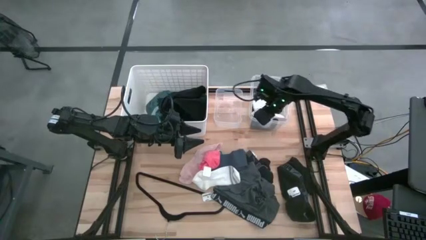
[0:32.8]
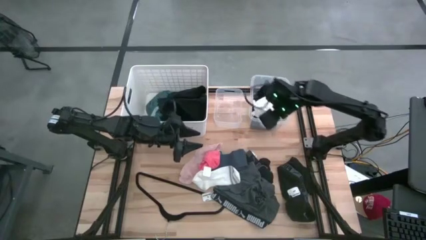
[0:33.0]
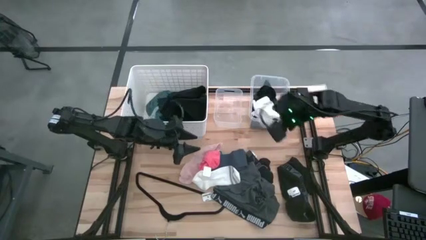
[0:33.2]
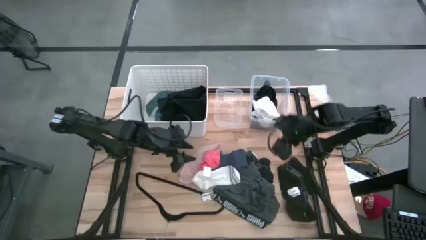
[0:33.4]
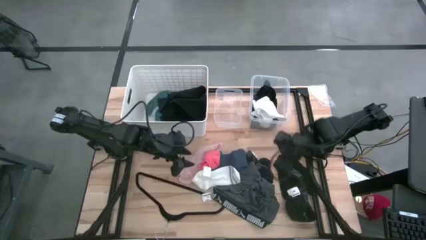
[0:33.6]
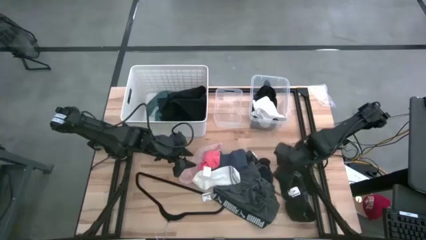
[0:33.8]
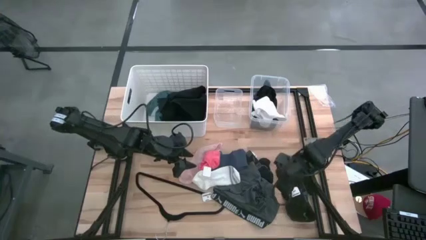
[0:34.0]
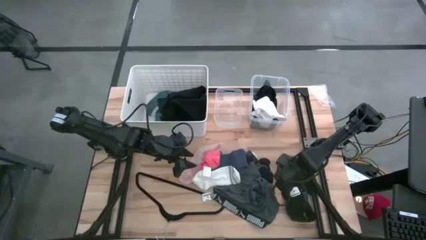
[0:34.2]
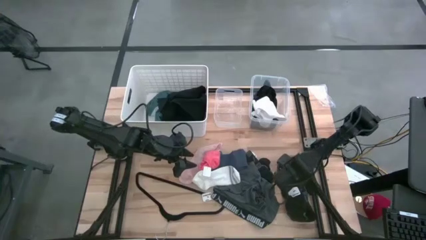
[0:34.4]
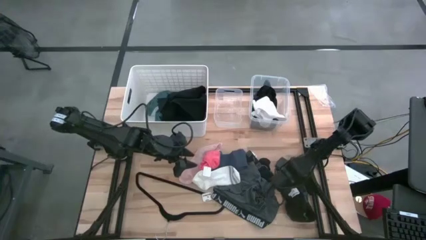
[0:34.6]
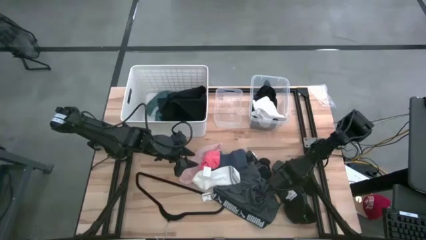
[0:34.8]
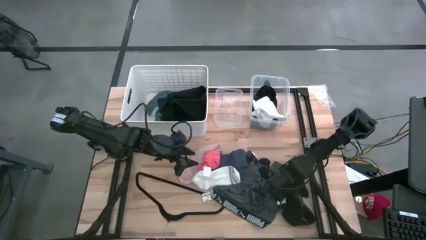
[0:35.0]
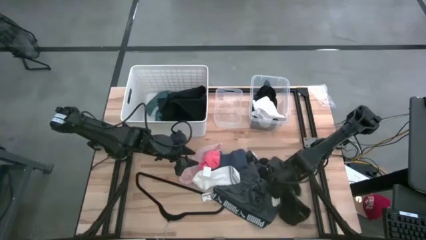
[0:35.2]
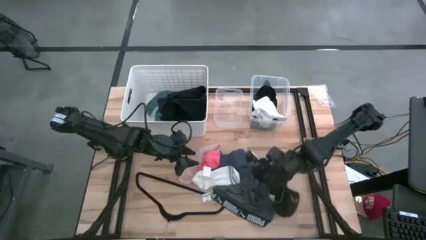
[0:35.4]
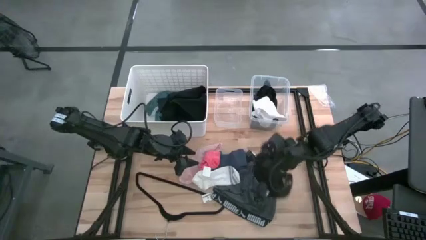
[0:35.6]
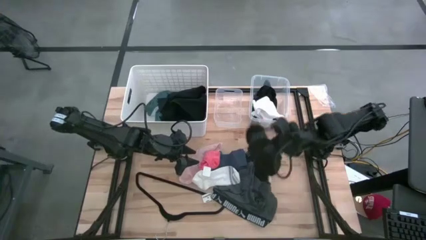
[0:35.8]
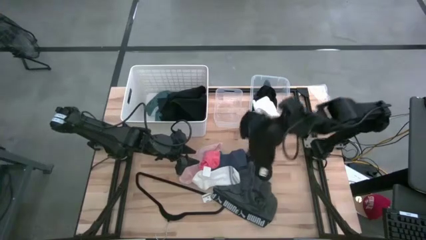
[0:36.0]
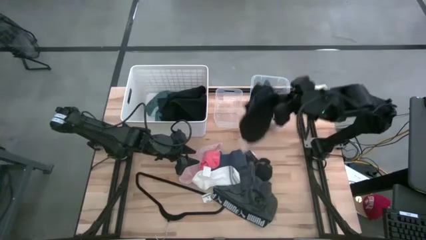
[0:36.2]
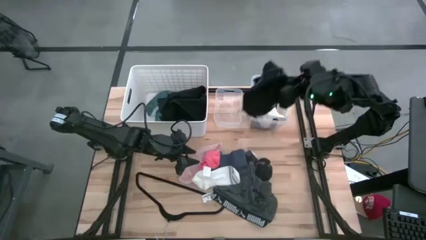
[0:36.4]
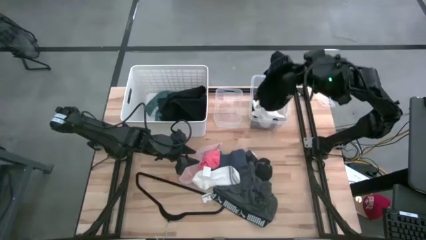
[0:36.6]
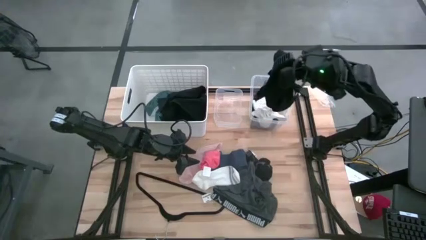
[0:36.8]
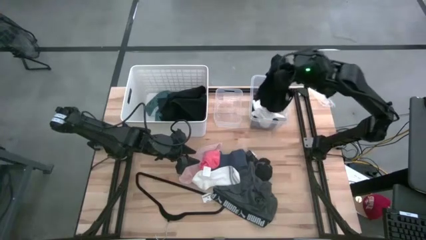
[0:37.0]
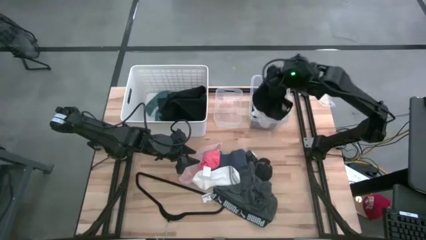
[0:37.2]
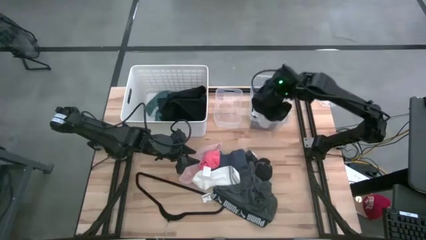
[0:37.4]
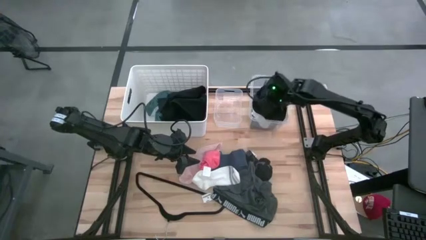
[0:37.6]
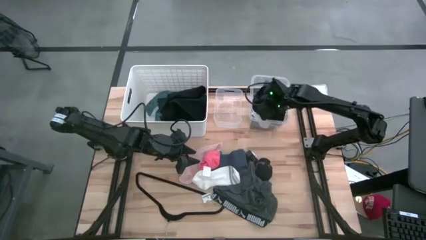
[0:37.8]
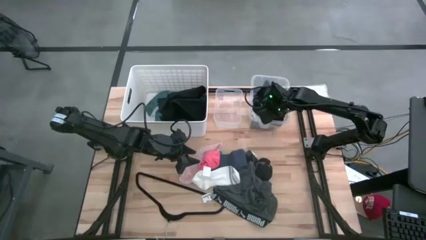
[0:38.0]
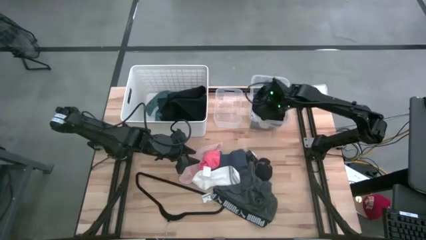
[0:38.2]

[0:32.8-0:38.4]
Task: Pick & Place Cloths
Put the black boxer into the large transparent bin

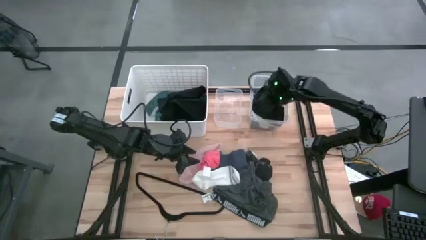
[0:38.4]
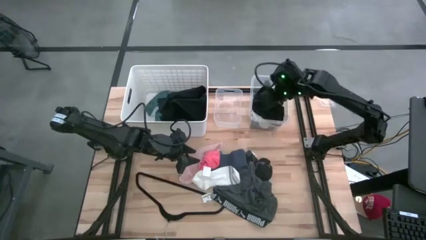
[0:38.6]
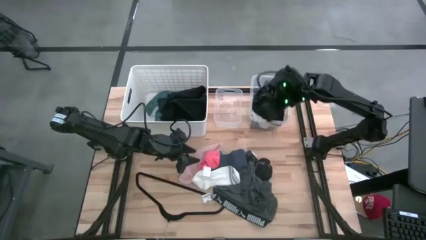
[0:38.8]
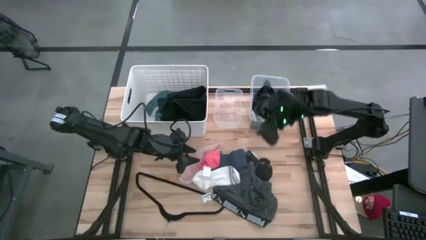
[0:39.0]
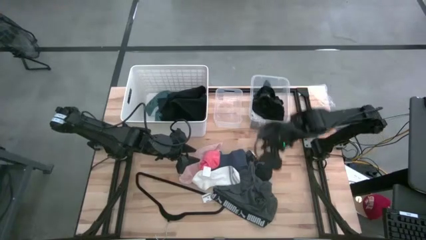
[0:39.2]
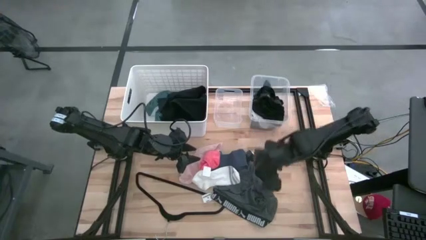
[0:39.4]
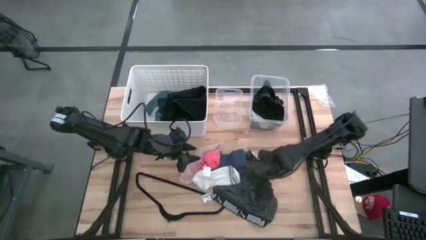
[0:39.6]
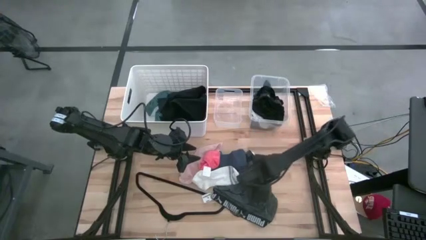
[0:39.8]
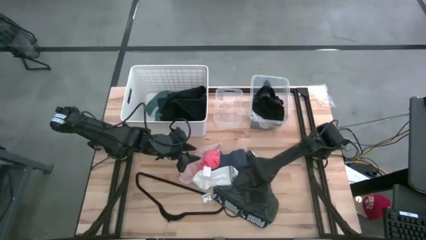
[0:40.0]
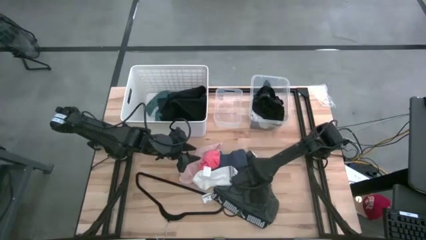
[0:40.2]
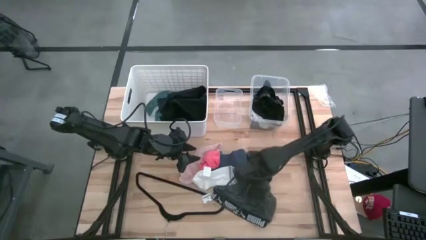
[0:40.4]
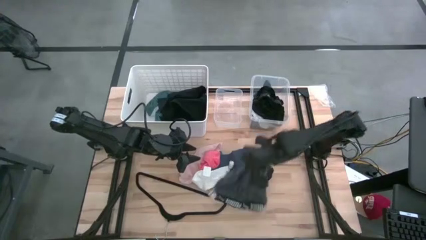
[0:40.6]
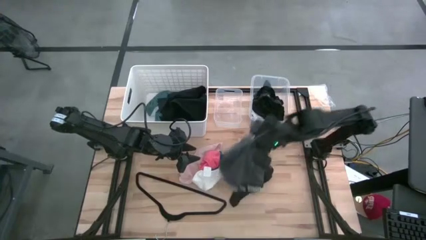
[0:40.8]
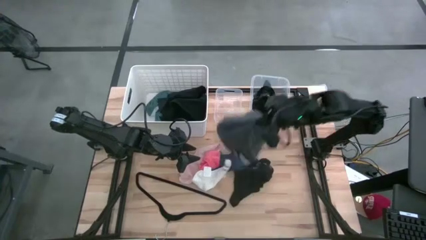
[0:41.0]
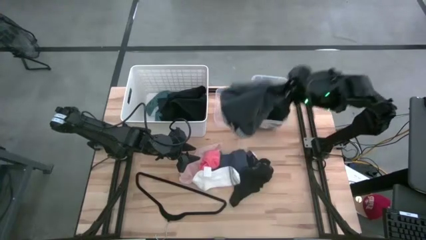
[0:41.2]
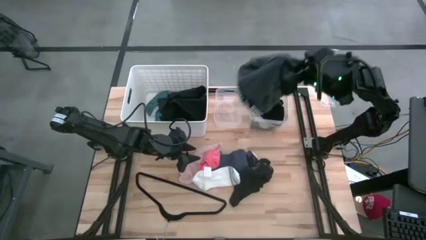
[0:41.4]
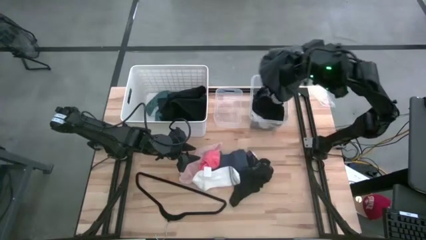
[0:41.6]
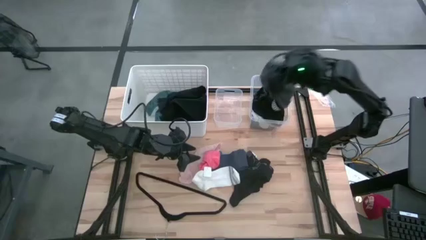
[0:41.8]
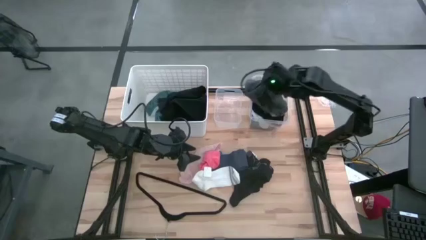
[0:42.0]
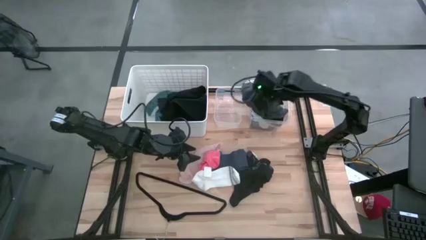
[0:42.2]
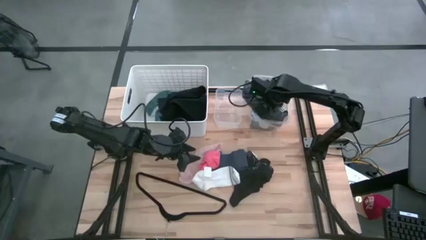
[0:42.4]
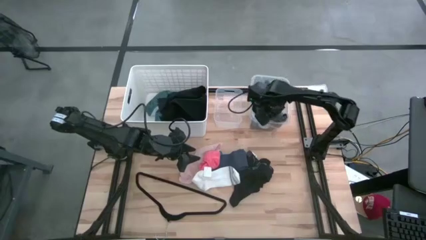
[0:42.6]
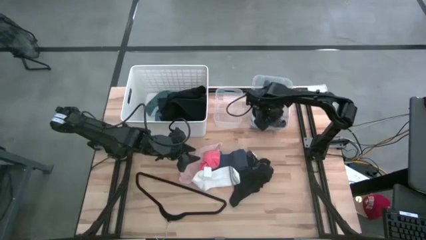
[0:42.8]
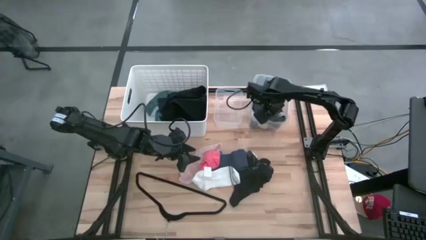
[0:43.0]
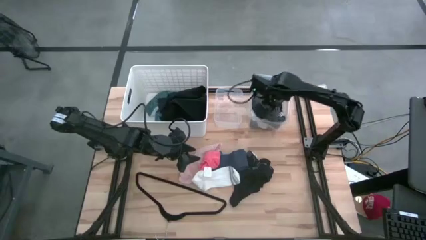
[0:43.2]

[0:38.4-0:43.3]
Put the gray boxer into the large transparent bin

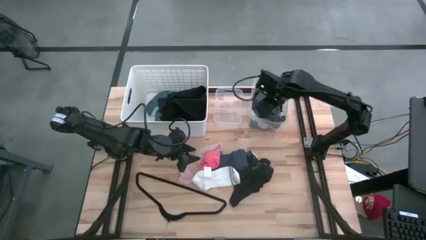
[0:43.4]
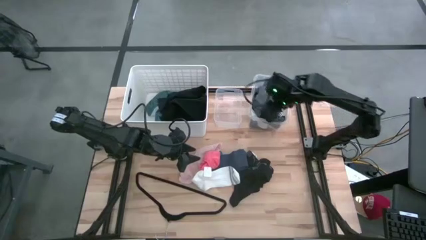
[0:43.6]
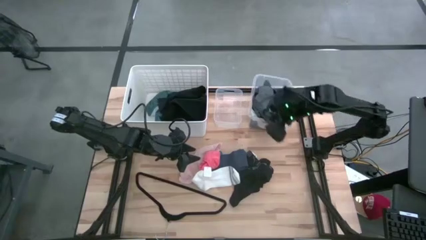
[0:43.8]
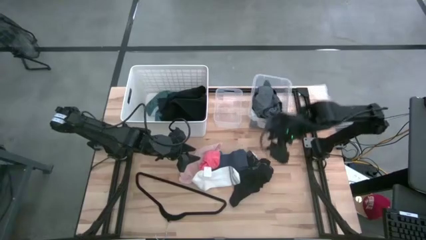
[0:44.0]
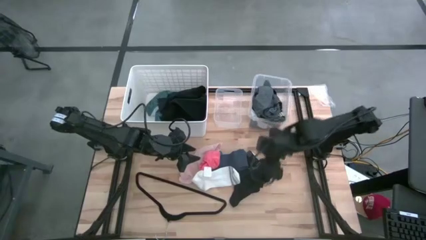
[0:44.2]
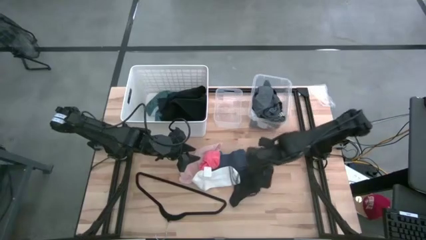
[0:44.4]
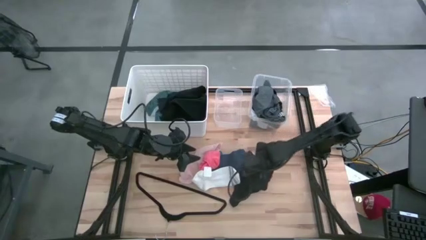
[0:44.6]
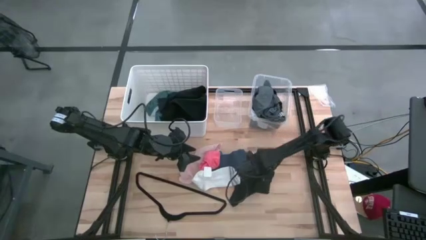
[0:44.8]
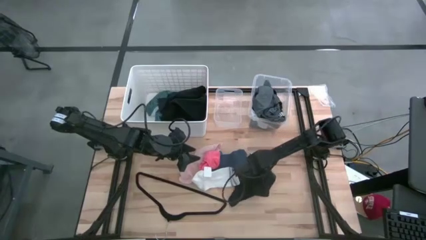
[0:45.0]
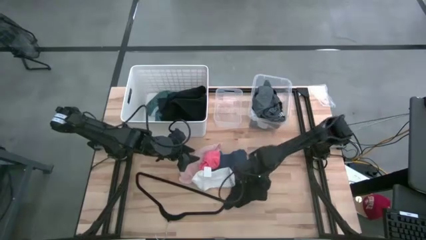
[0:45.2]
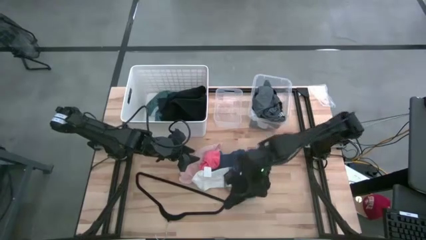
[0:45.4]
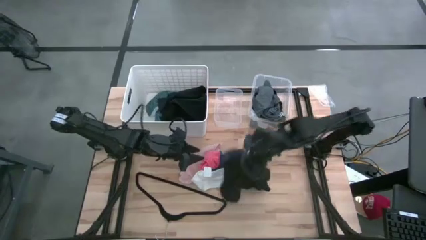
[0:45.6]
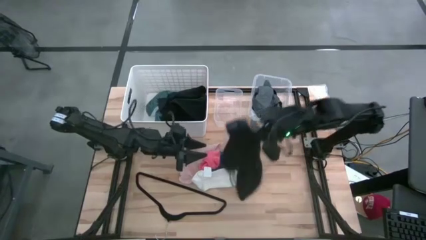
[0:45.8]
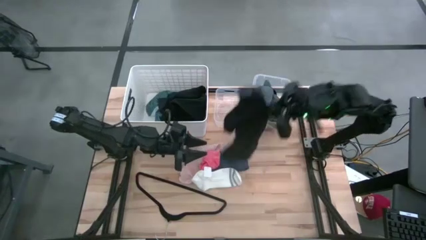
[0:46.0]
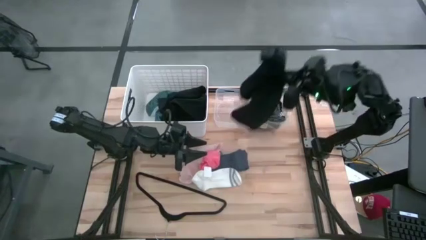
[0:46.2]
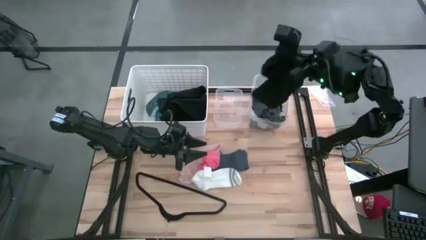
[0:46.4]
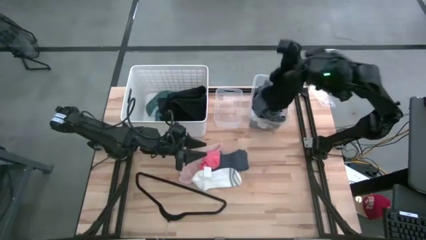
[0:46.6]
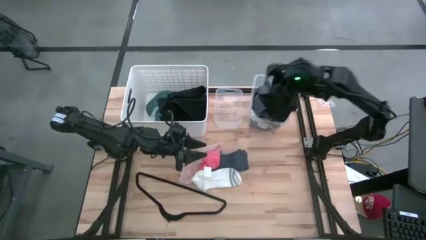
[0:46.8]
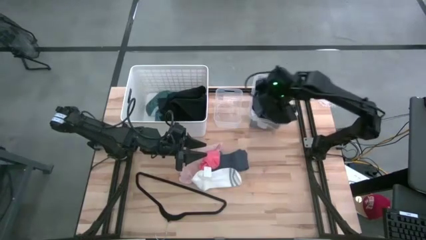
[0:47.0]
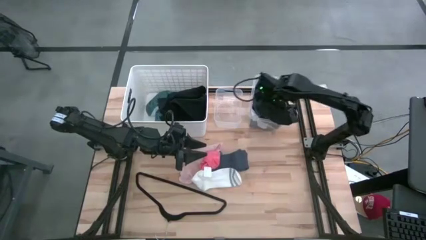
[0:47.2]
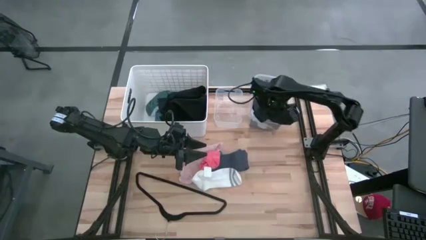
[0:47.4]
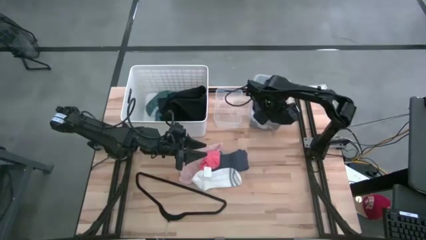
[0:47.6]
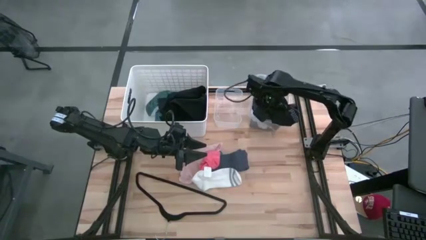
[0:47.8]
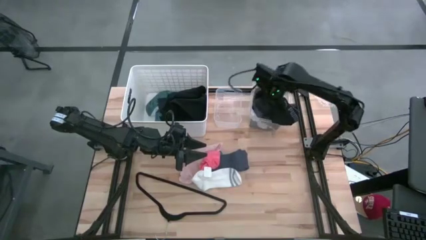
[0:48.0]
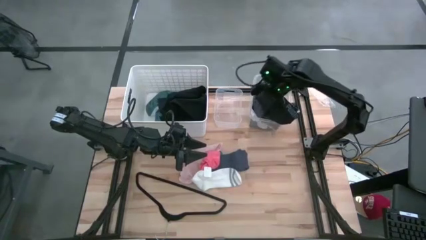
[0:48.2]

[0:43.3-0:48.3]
Put the black boxer into the large transparent bin

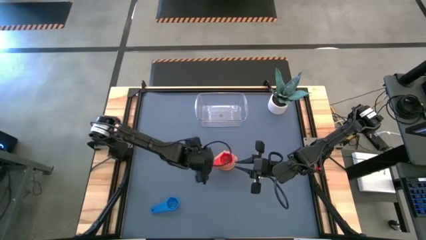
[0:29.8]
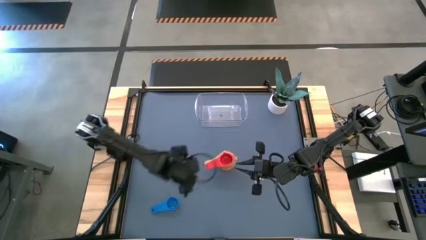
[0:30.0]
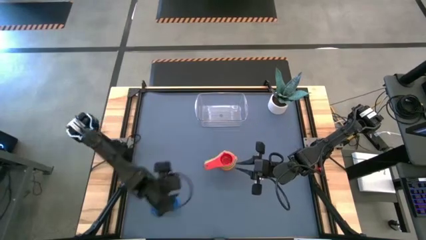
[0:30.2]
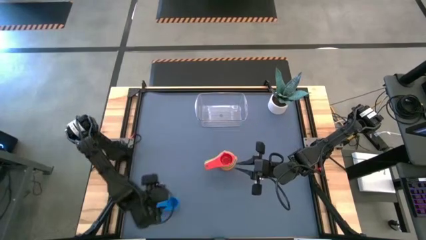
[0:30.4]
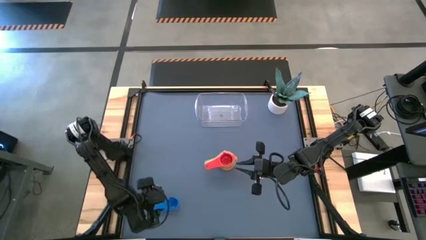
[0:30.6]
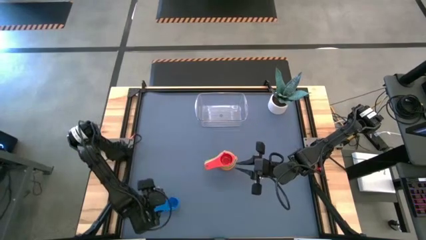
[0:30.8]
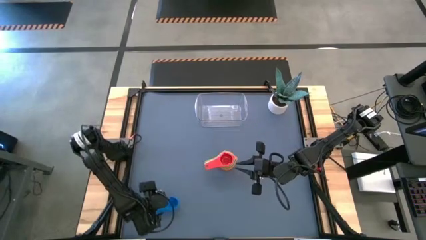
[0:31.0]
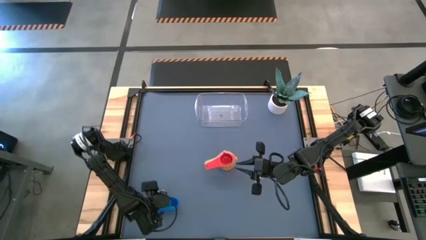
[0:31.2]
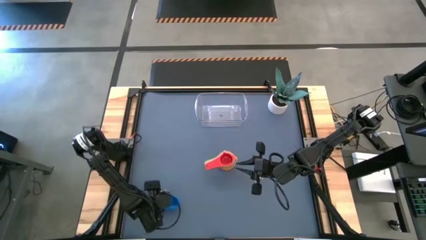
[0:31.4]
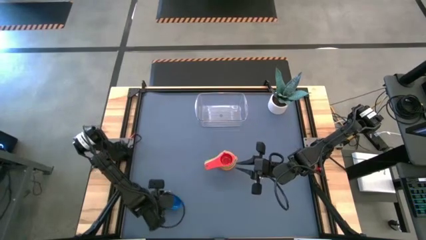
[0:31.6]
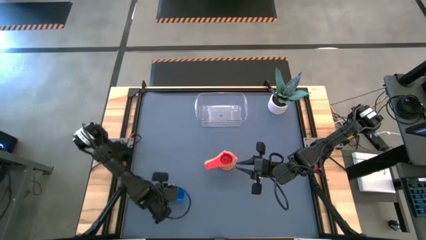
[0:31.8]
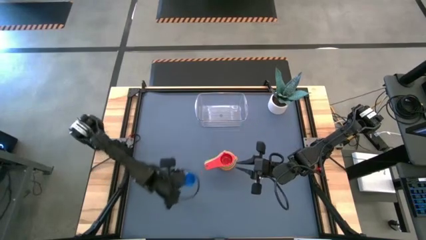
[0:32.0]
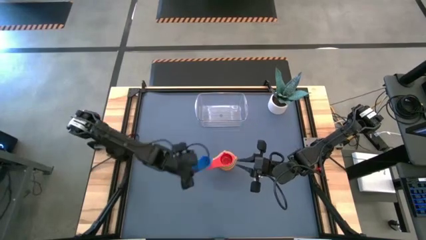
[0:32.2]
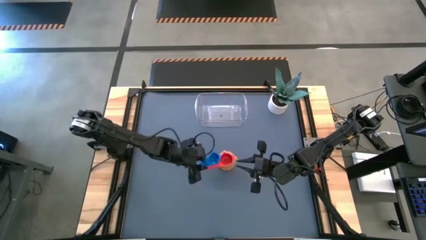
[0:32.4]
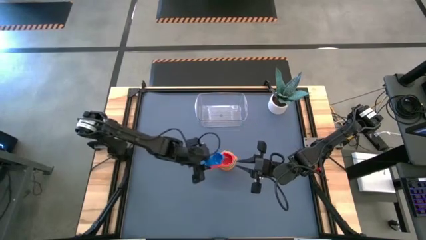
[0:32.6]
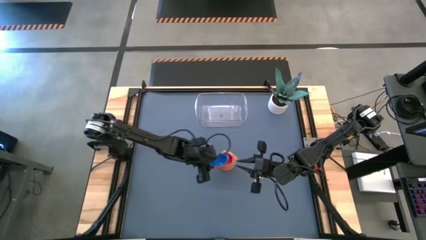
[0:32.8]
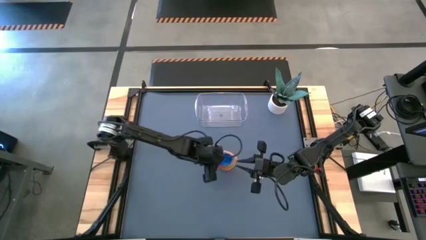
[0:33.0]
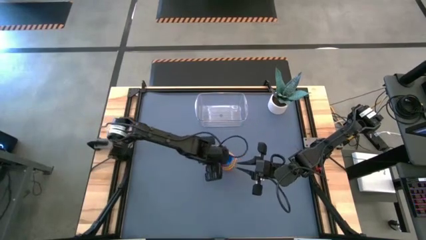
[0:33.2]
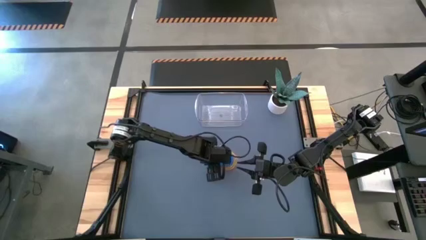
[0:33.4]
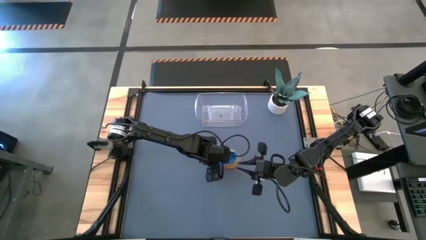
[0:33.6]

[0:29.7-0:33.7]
Task: Nest measuring cups in basket
Stack the blue measuring cup on top of the red measuring cup
